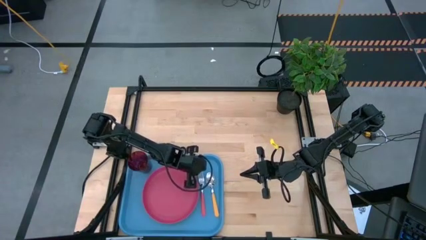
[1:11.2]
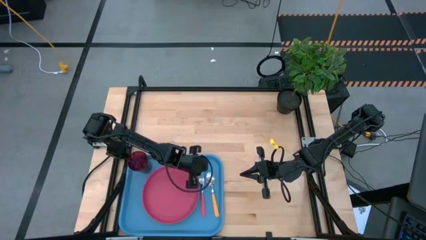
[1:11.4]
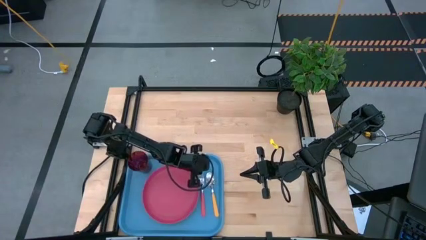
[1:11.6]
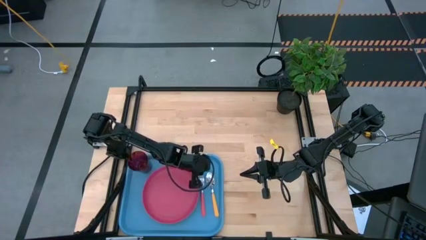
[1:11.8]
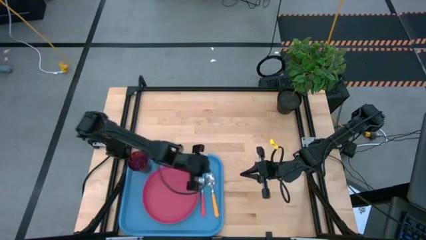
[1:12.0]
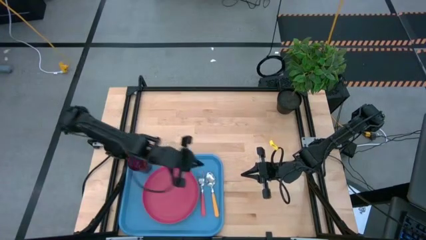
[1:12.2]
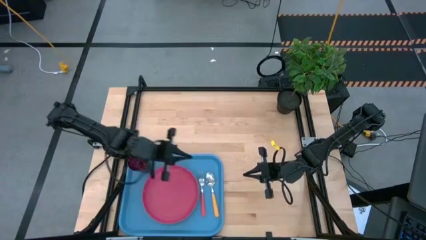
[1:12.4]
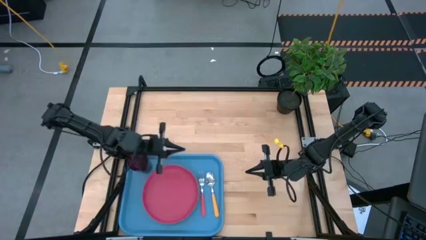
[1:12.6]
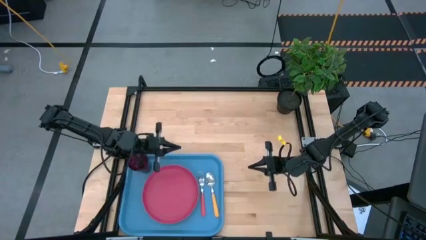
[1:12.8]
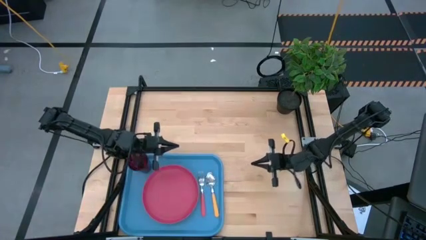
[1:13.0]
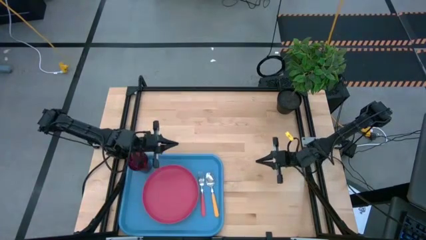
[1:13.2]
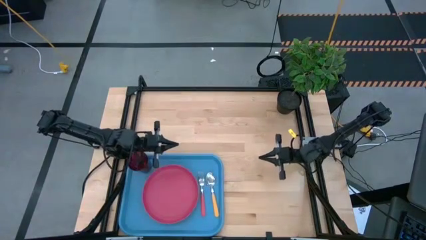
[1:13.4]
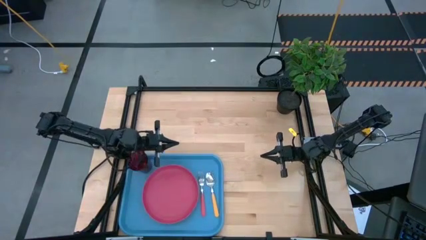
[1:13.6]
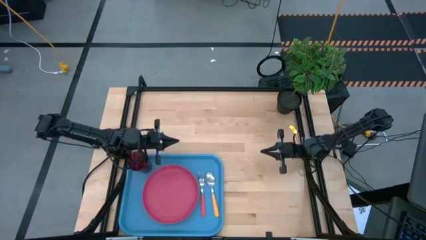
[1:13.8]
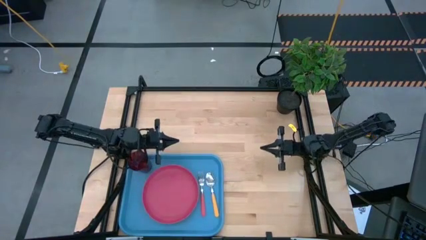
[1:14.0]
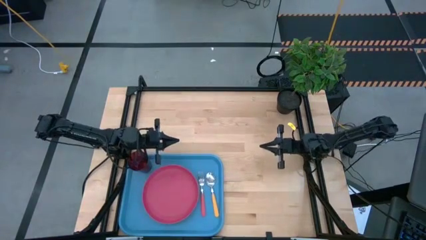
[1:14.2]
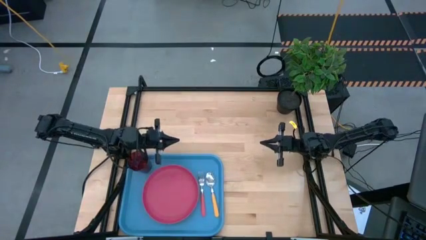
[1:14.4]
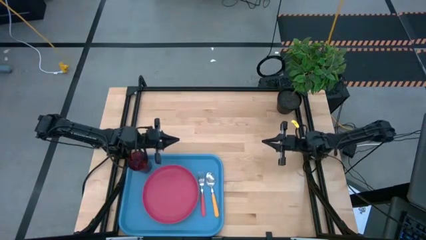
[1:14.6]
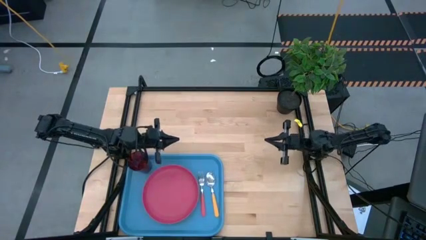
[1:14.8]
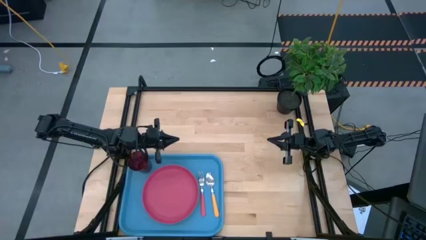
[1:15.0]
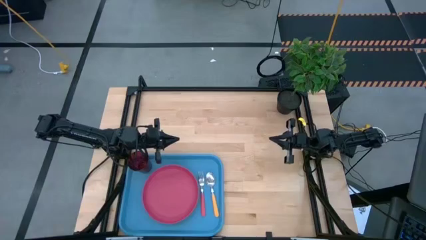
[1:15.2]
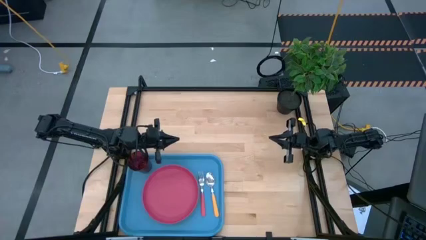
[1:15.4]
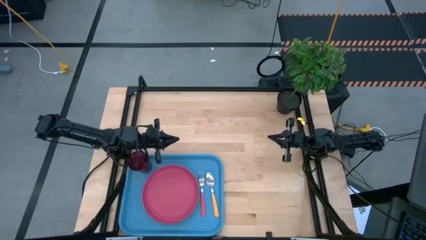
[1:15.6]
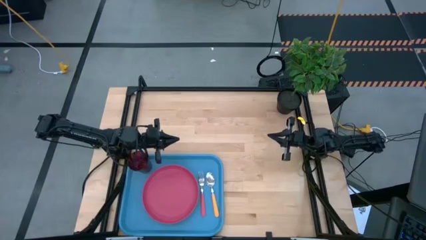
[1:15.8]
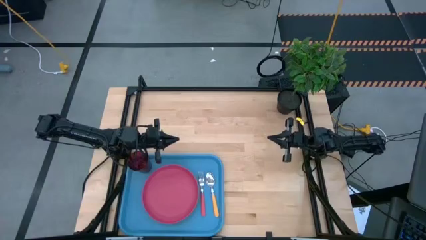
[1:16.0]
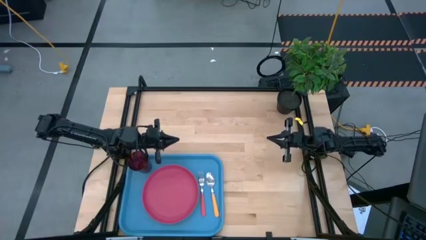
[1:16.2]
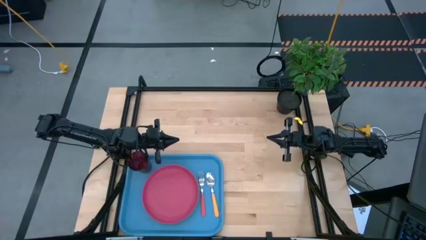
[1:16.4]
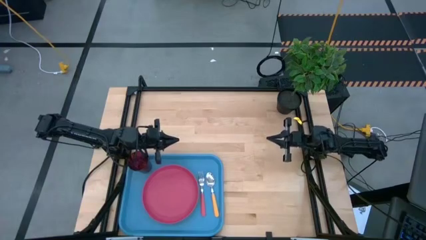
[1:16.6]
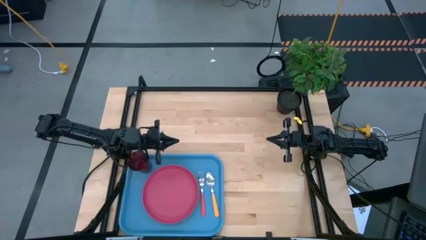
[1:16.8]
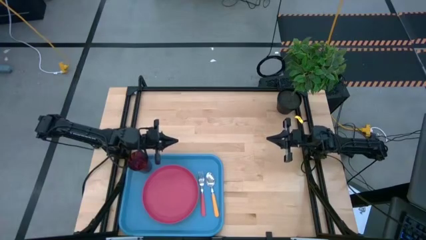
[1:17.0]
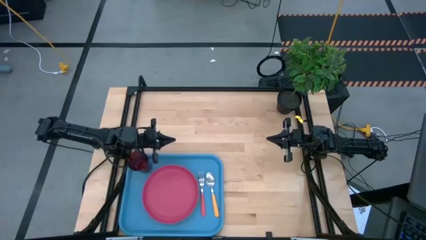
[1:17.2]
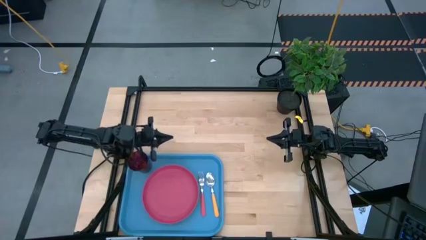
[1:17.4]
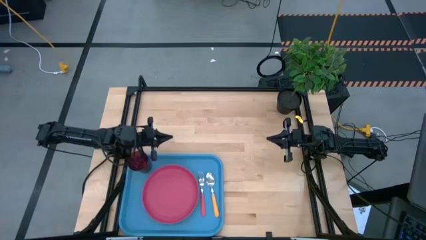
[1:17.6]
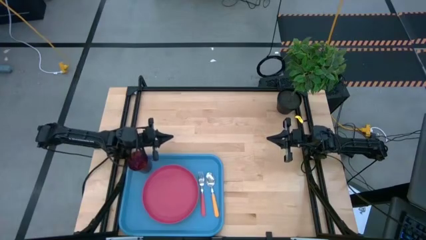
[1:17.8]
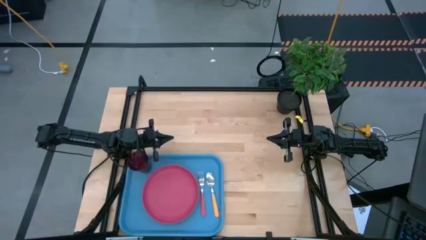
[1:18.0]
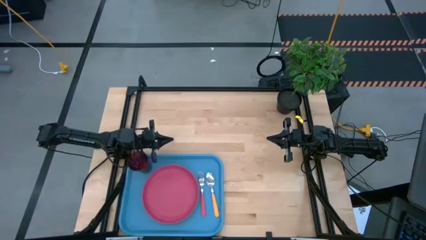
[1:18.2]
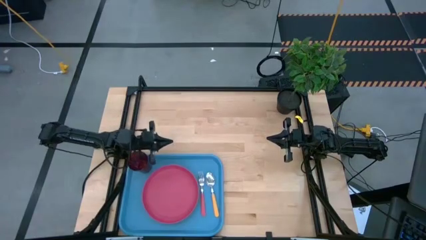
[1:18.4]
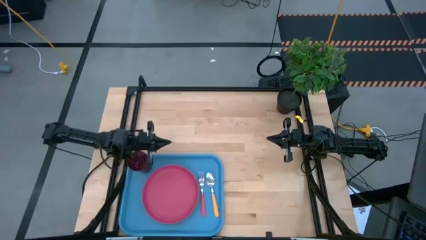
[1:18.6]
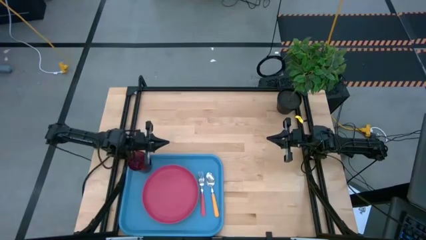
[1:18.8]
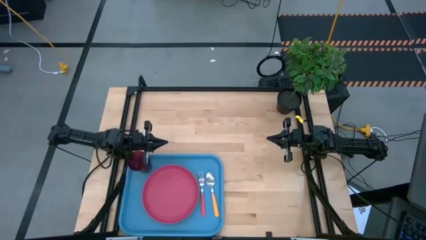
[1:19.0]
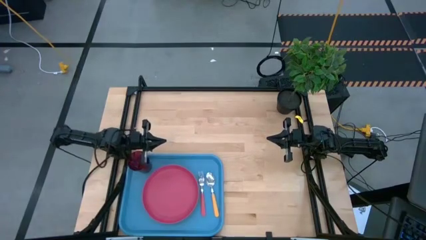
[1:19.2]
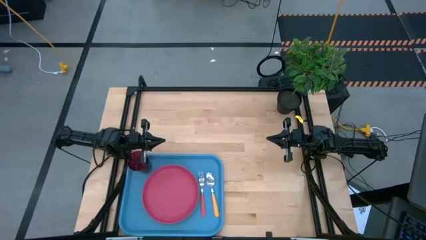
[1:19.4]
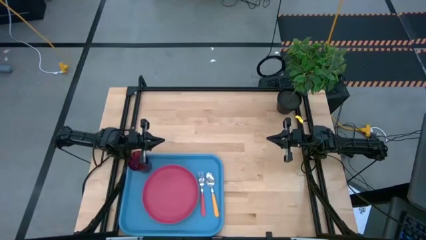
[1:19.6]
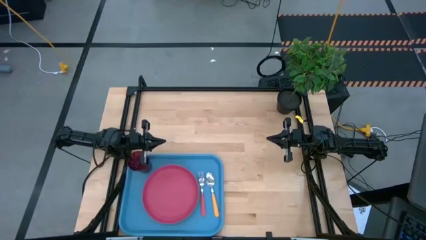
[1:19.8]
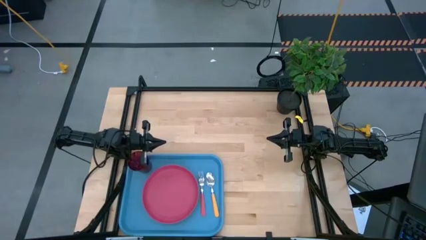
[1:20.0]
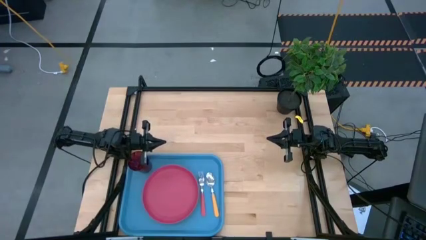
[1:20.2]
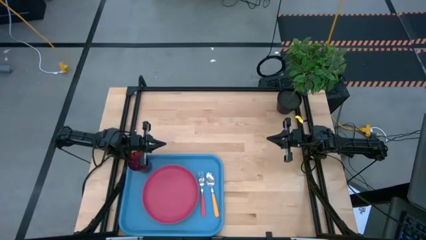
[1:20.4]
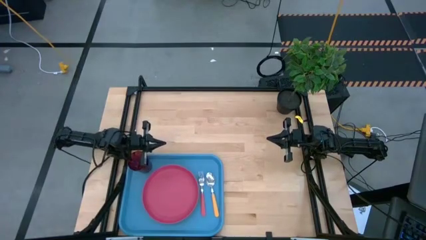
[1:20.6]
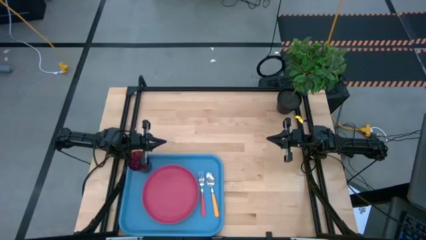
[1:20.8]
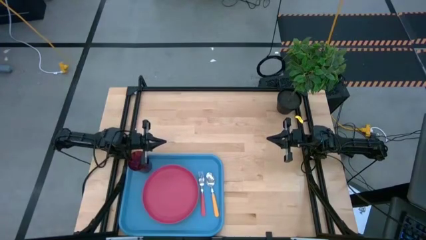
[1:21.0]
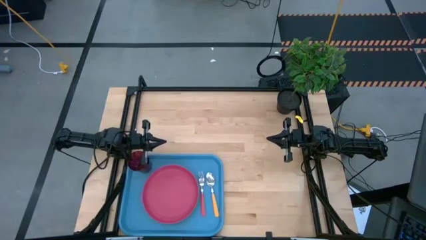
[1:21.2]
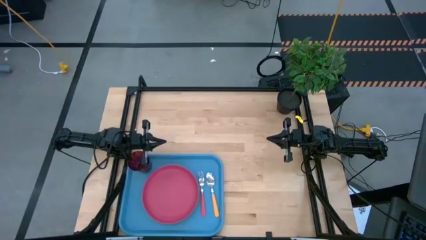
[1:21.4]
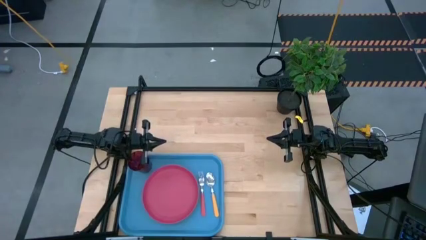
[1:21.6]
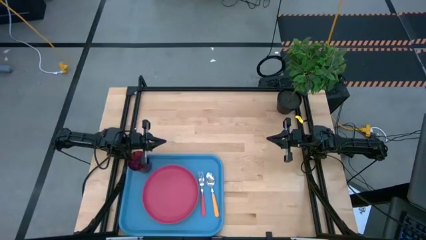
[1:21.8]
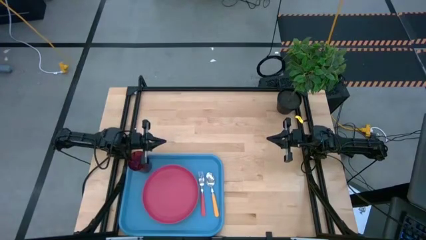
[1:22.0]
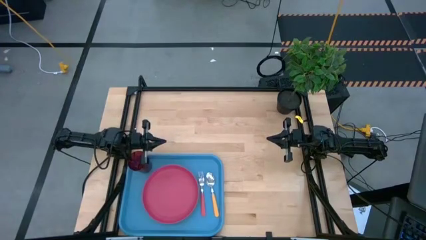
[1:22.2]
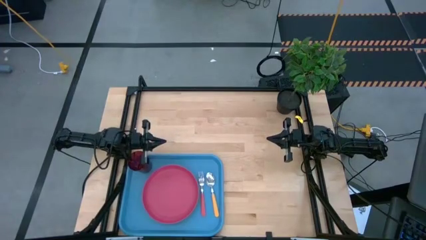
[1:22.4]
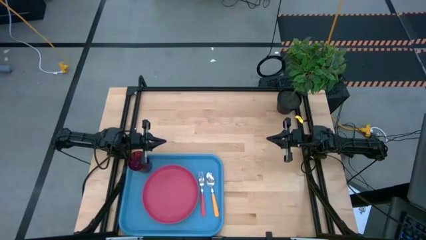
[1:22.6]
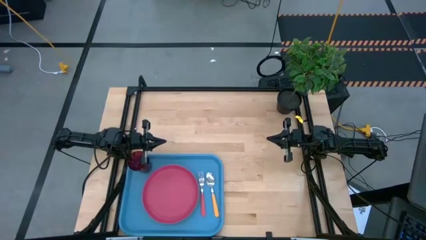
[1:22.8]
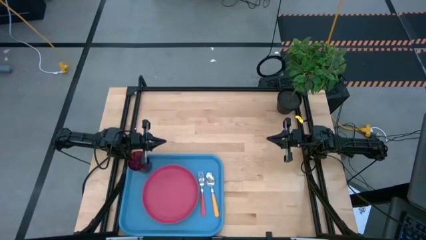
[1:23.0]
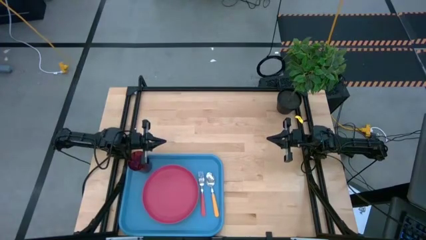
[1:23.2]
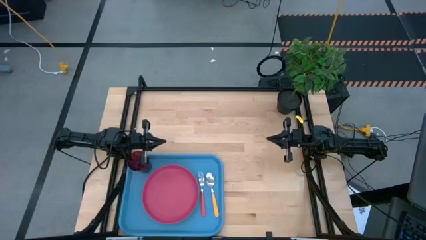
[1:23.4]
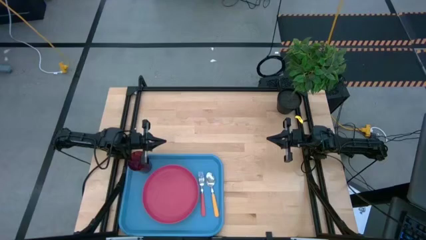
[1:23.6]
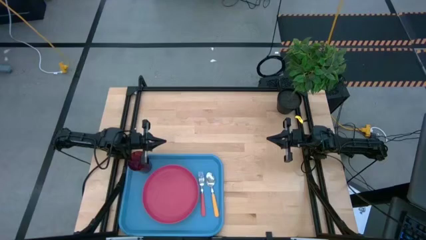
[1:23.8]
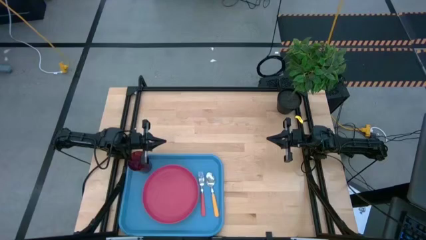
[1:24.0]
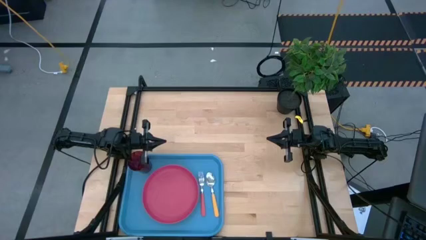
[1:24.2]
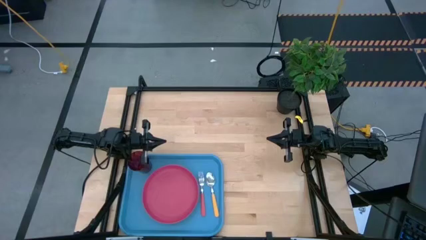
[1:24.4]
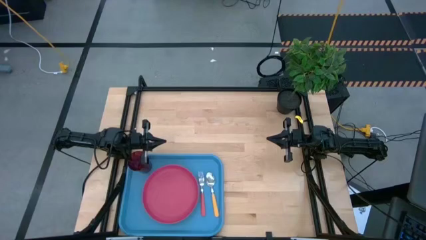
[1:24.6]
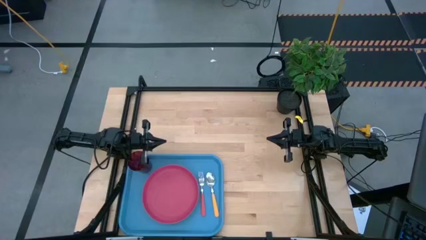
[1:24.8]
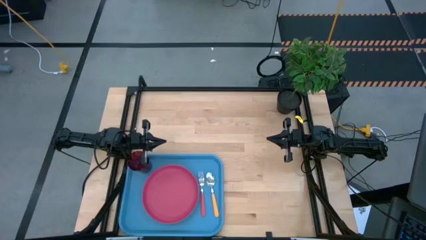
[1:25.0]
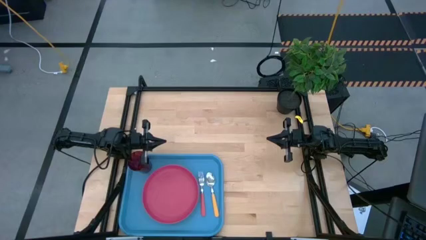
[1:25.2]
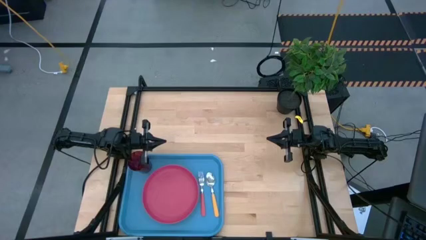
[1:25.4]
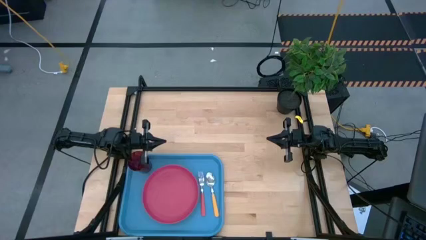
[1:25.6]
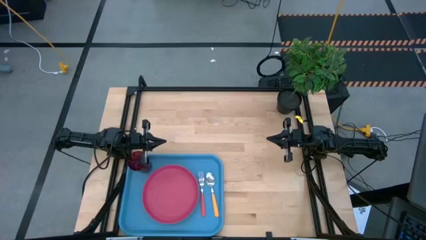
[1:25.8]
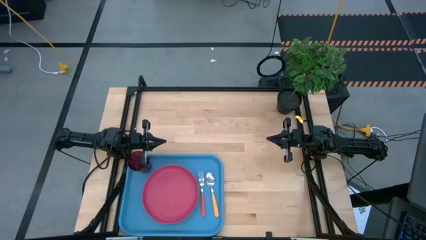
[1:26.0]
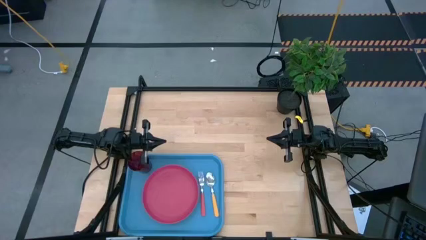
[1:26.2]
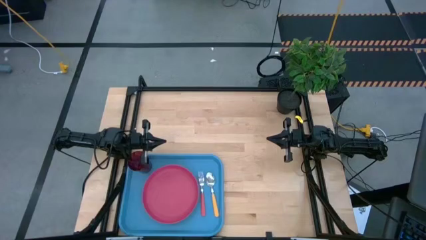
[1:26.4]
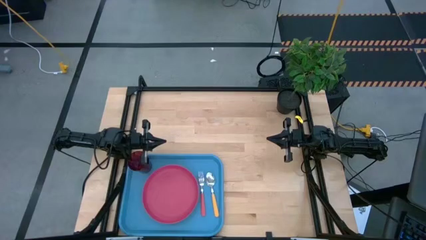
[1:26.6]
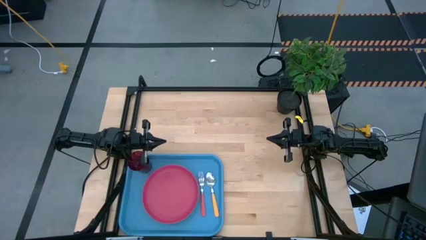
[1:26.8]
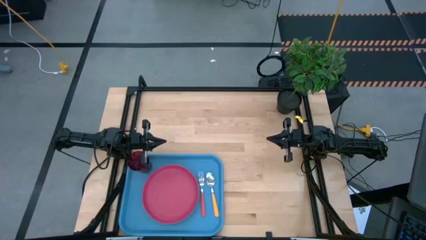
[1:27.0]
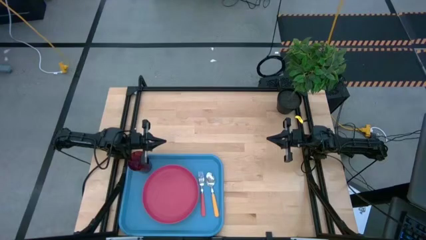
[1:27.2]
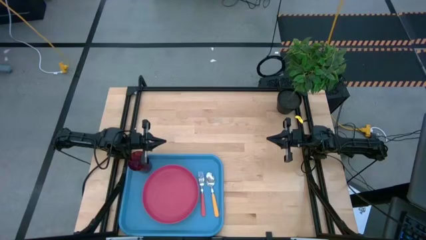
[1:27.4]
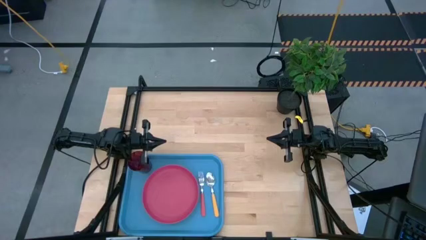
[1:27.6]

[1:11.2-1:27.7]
Task: Pick and place plate/cup/fork/spoon on tray
Return to Home Position
